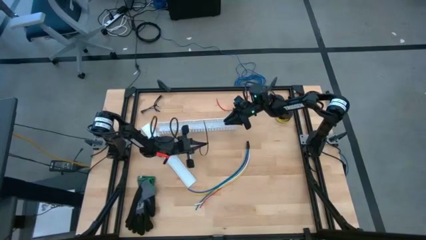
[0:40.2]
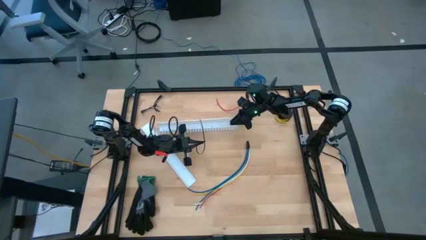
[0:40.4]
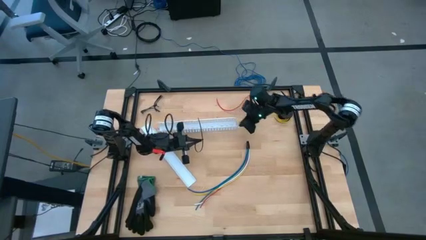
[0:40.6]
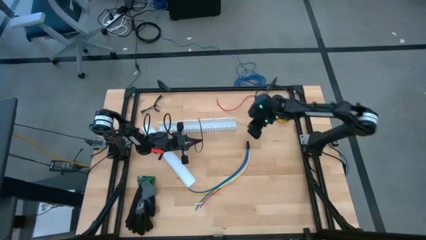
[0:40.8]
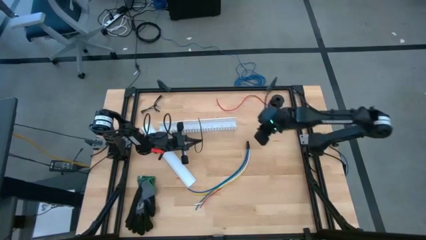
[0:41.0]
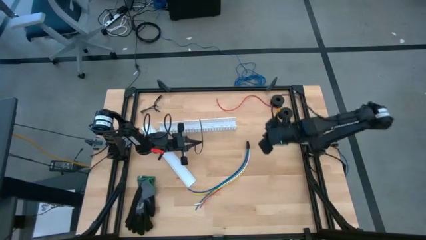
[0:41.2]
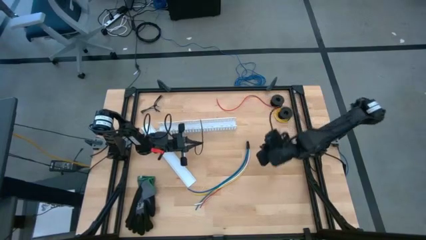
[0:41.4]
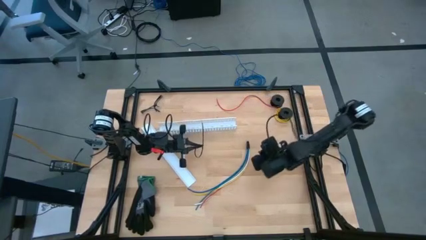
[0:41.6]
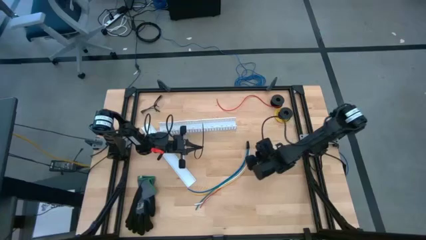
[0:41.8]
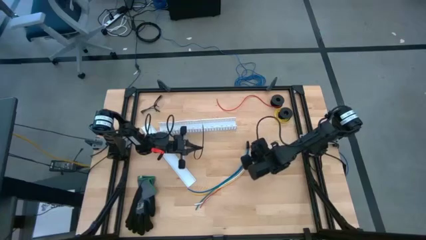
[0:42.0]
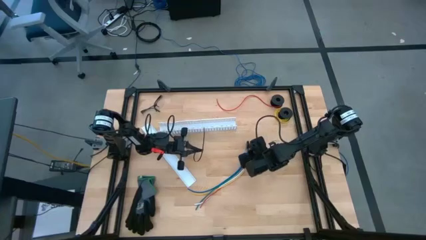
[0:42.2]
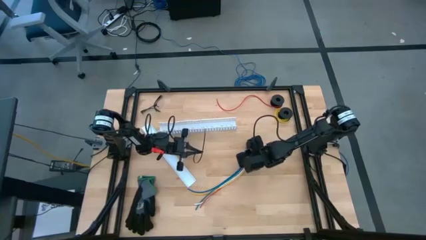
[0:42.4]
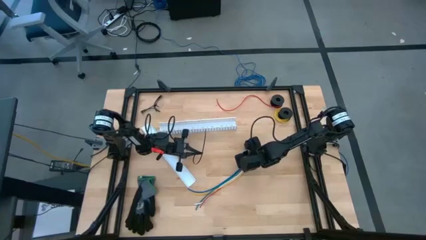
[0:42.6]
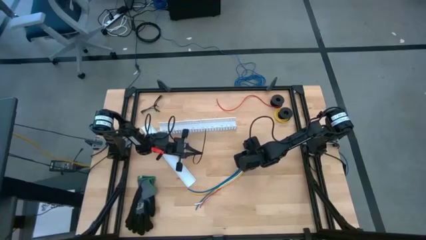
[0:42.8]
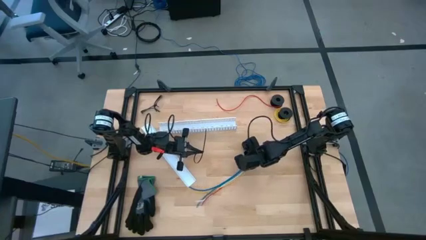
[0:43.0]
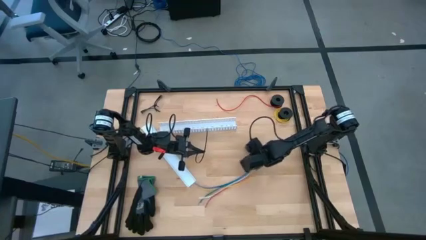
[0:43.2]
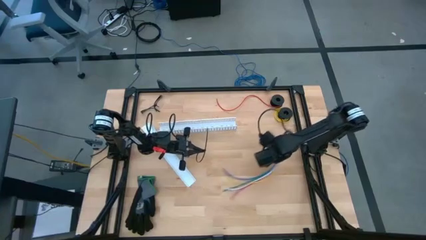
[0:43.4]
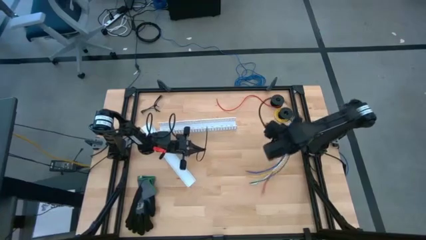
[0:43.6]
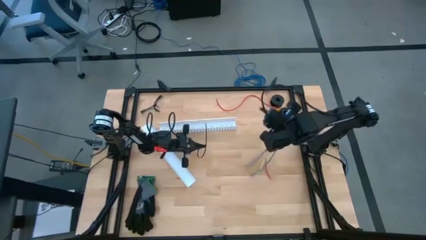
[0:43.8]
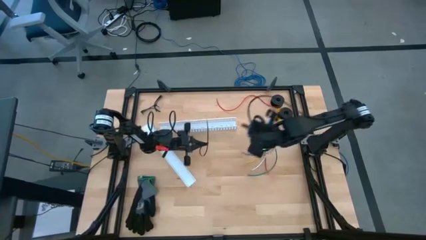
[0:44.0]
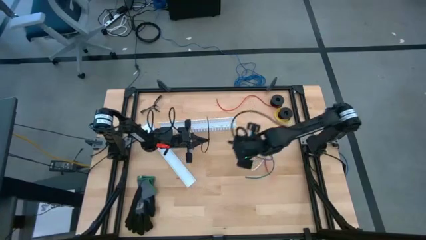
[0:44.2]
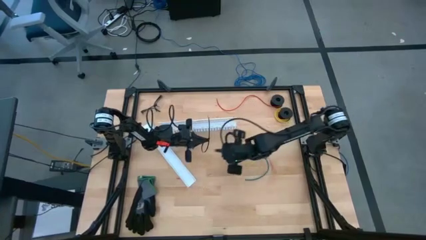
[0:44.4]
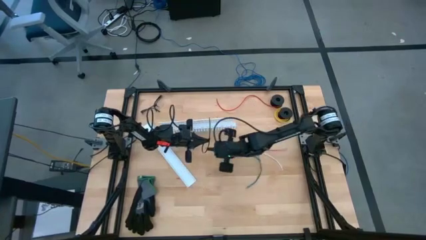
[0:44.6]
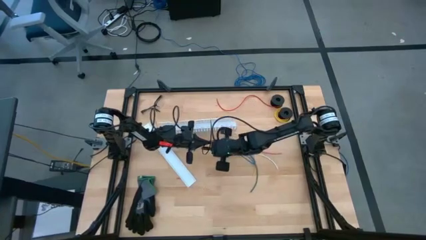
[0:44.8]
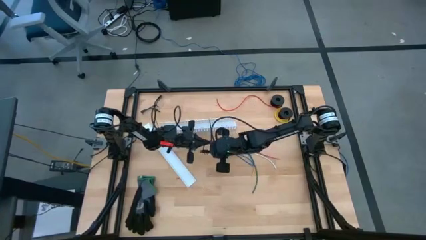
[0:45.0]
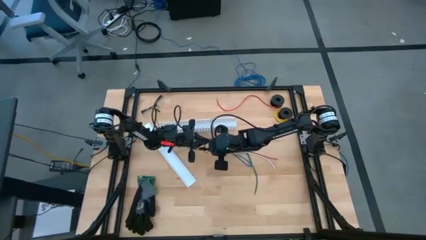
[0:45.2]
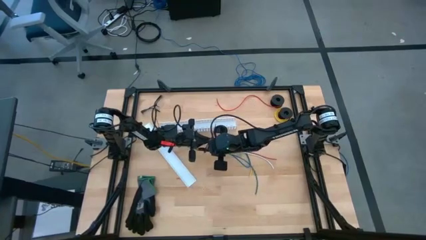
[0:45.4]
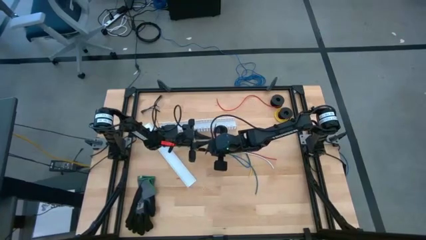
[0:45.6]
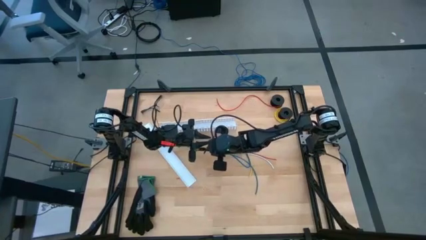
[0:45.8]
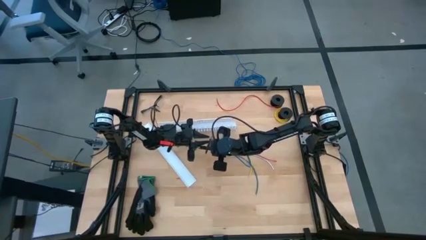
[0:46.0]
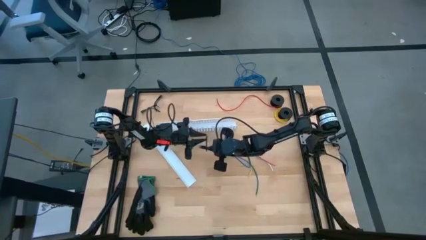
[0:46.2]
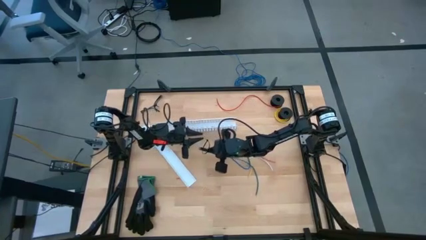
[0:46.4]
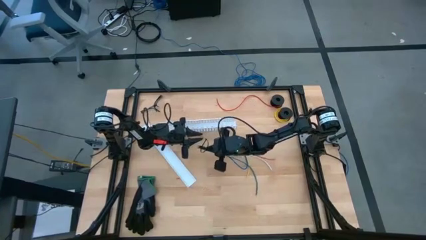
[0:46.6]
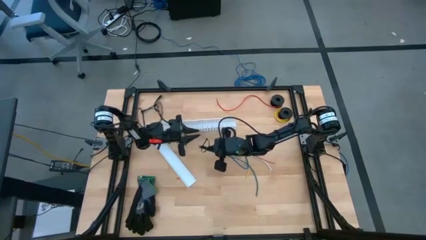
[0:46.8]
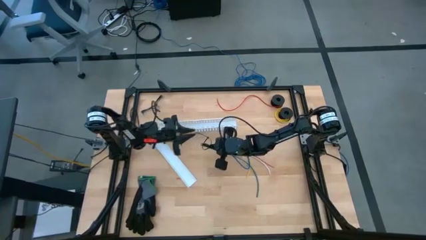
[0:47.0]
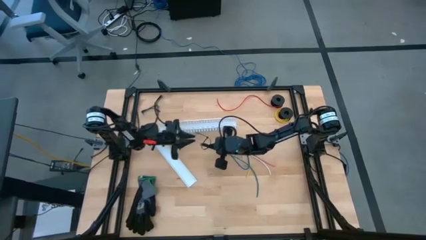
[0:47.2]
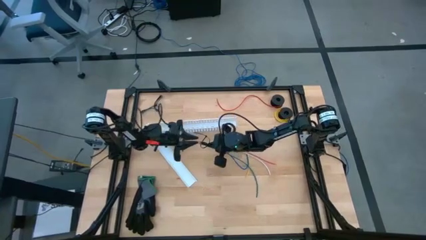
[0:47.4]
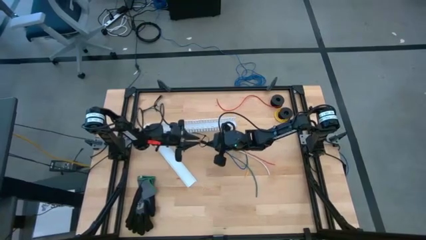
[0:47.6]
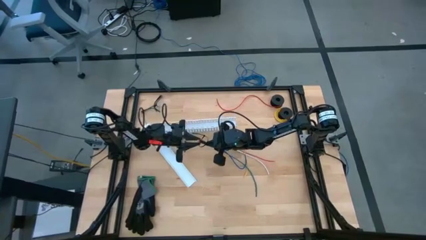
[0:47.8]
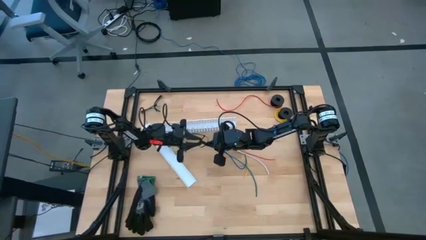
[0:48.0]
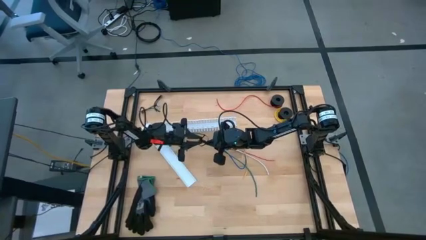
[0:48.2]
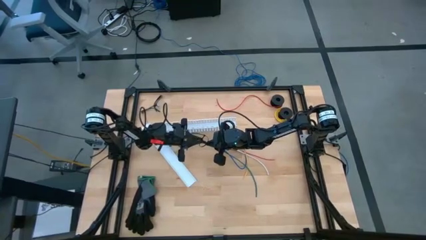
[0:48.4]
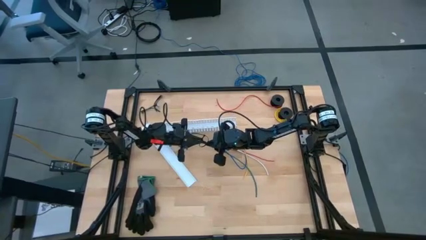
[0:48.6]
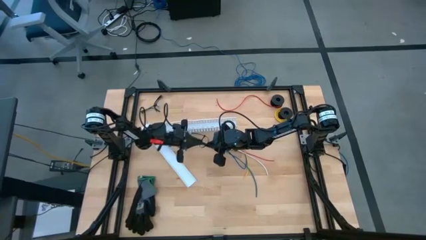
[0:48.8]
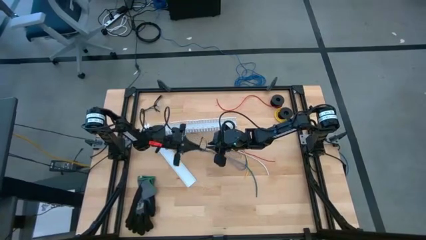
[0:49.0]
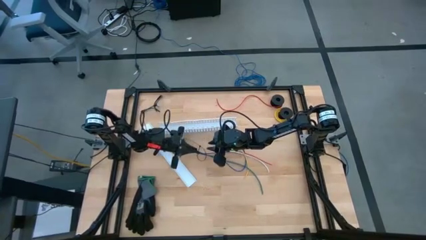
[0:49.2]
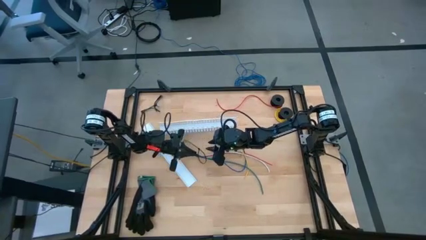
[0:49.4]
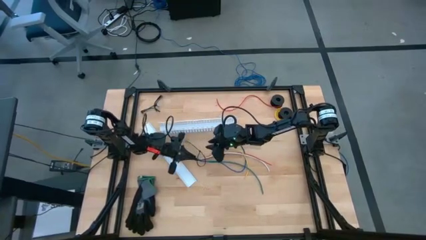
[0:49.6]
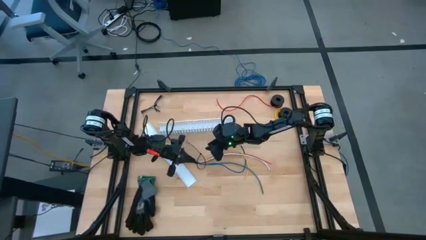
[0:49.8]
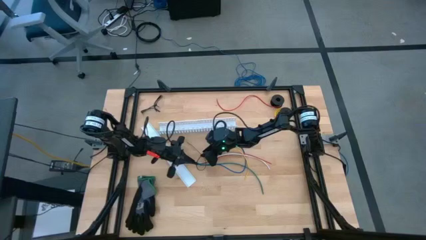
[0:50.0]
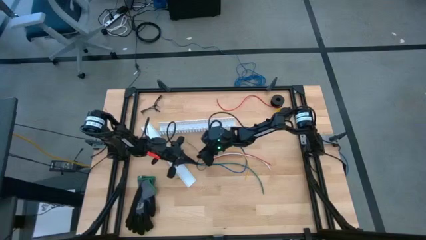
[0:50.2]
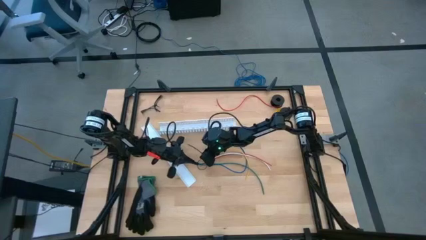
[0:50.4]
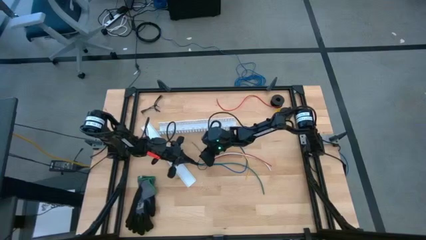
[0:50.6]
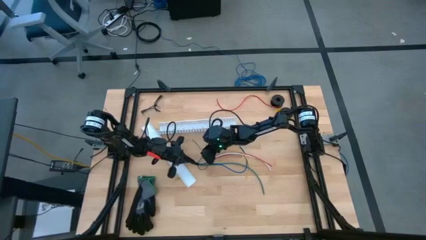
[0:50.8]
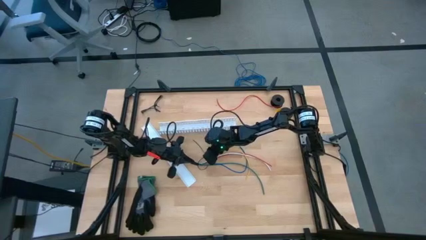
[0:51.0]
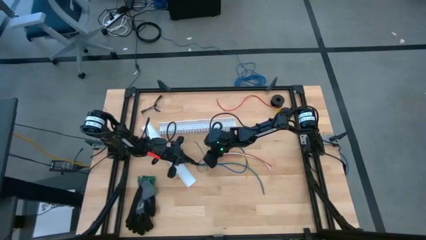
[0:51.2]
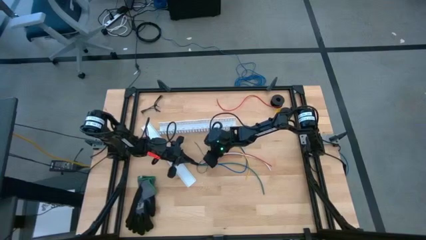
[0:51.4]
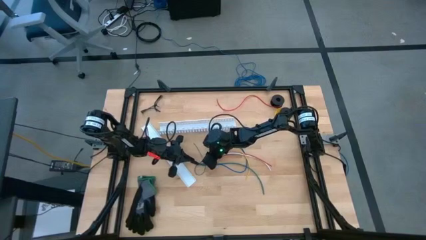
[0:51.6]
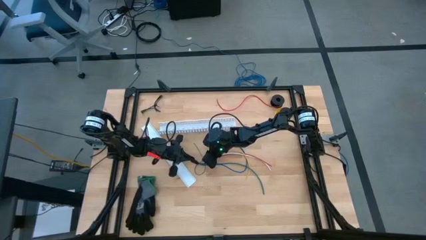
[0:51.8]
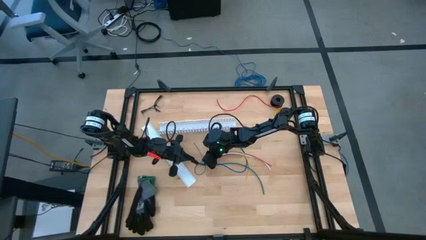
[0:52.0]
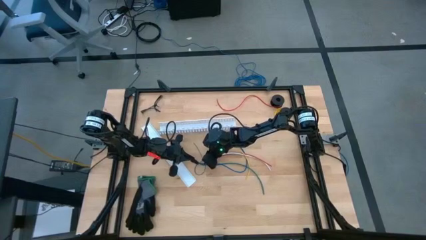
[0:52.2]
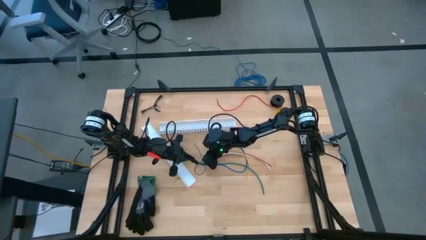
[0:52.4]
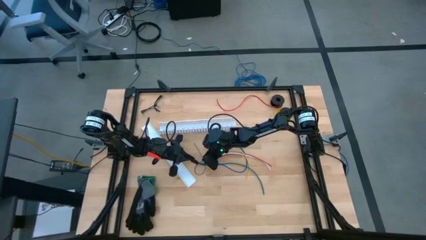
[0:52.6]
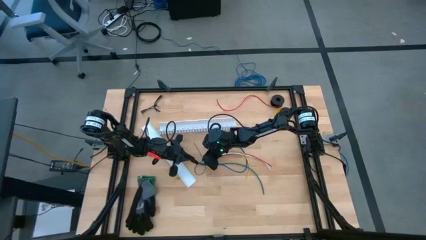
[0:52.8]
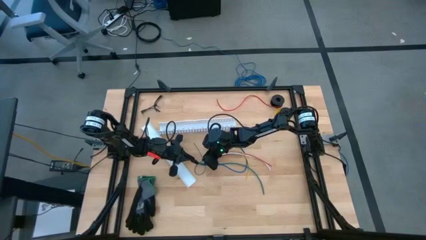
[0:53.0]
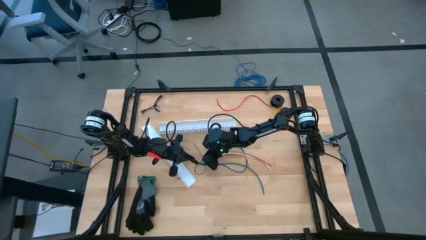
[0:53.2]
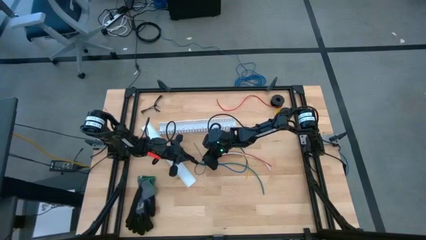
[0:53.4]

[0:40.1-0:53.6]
Task: Ziptie cables
Wrap the cables with the black zip tie

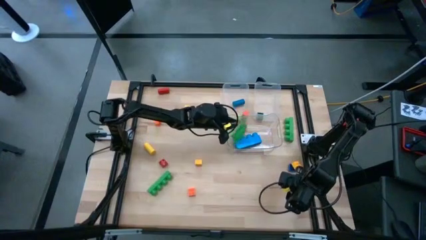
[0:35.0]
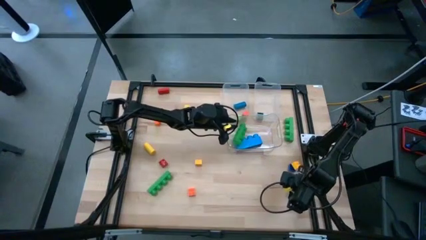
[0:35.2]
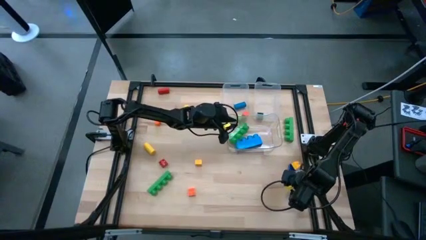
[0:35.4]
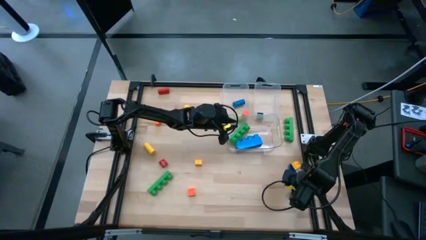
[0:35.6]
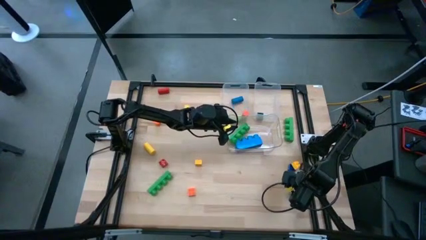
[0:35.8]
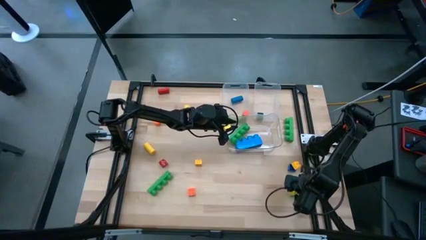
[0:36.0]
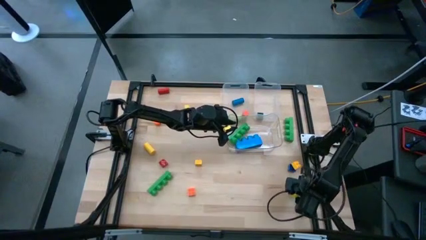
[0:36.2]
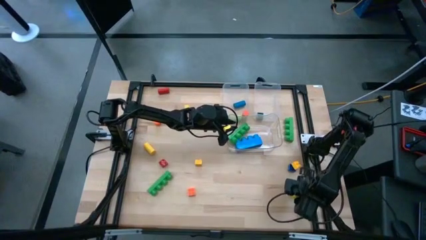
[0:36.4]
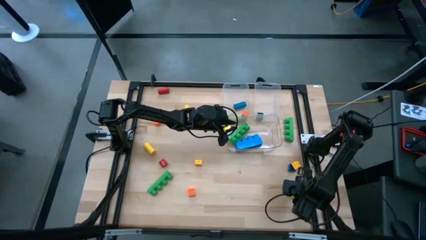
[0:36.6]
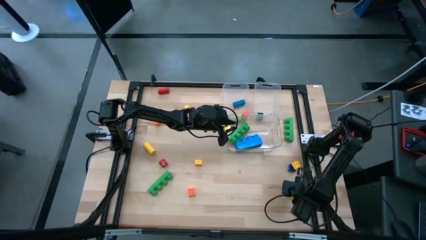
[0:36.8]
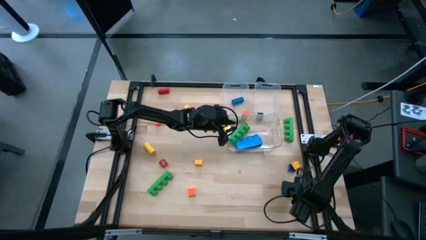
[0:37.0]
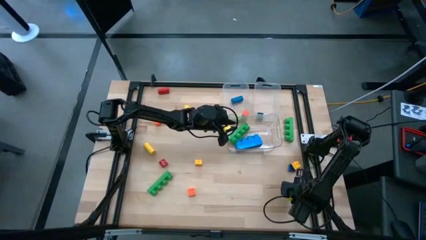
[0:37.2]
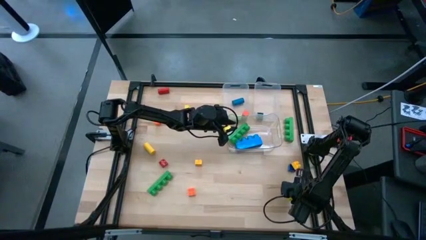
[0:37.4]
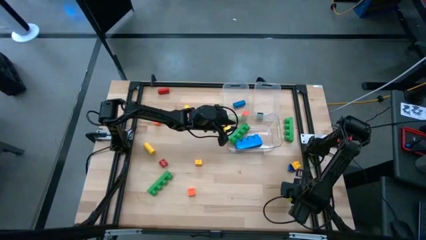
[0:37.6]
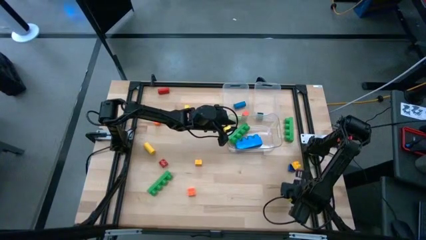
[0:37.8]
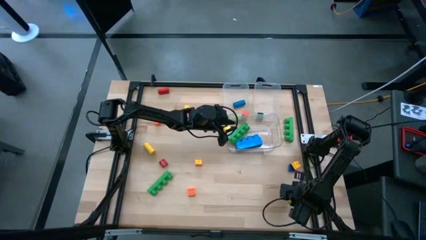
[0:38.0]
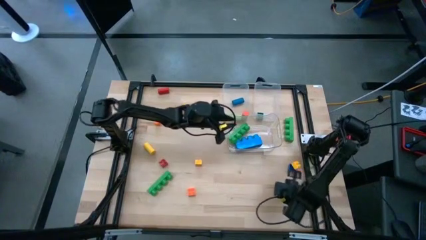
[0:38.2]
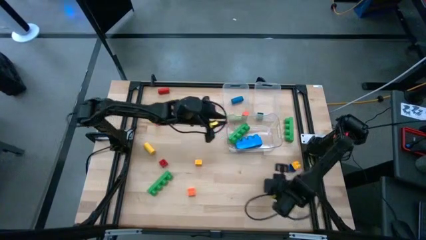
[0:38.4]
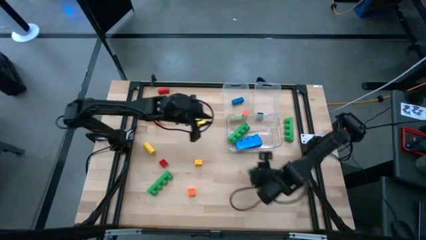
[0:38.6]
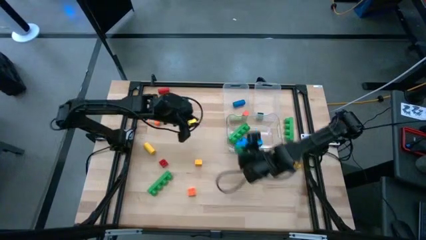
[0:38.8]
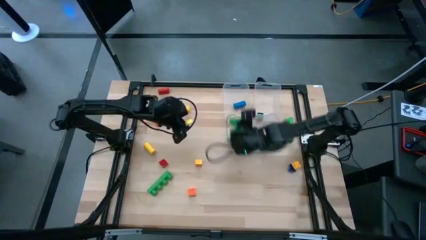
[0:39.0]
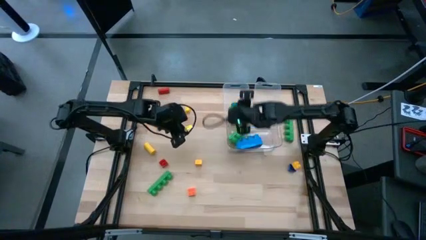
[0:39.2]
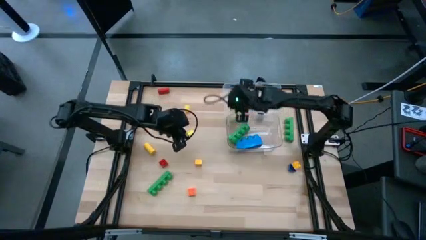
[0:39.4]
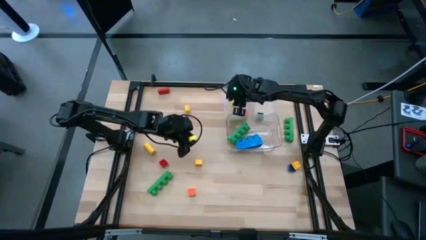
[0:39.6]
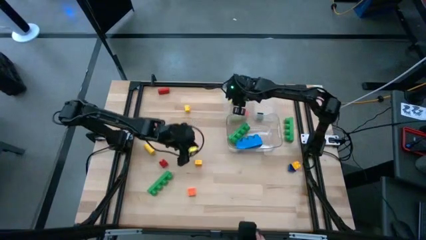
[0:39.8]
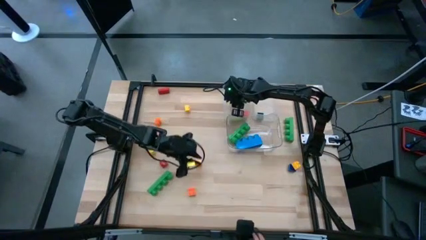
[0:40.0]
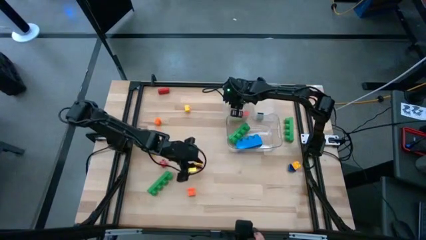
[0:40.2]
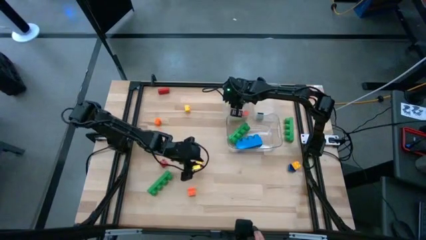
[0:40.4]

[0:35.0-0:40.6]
Task: Sort blocks by size
Put the green cylindrical block into the left transparent bin
